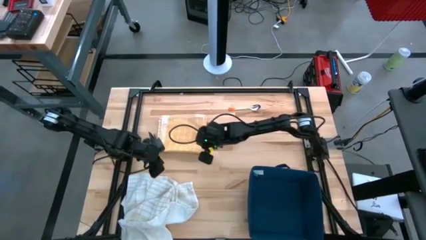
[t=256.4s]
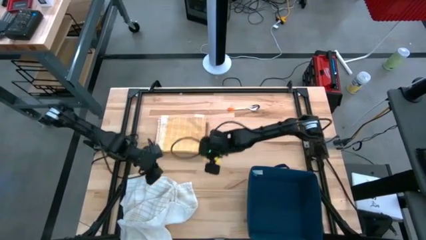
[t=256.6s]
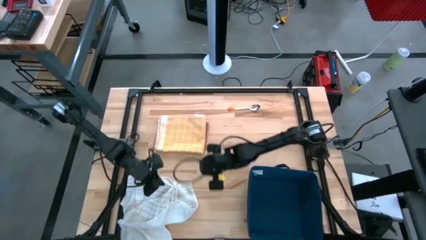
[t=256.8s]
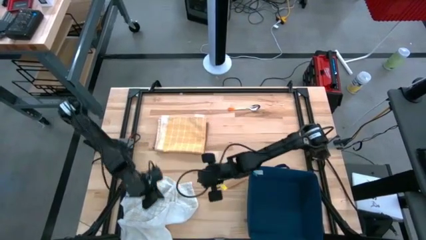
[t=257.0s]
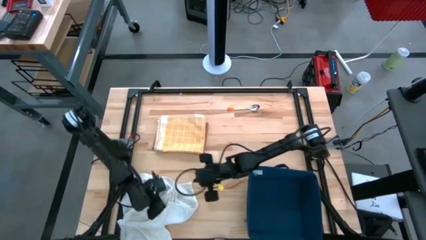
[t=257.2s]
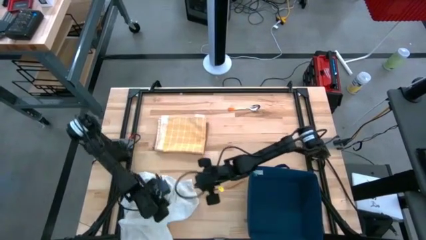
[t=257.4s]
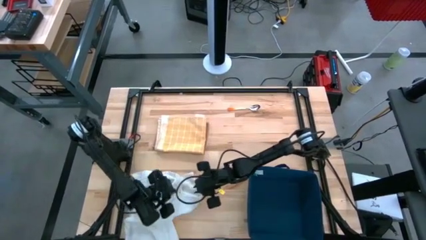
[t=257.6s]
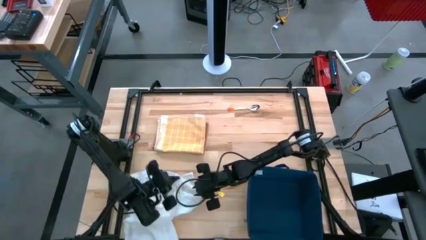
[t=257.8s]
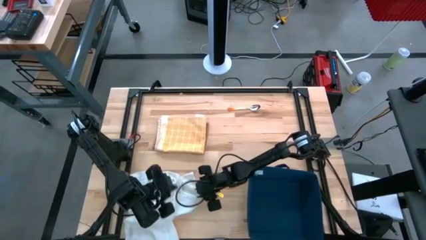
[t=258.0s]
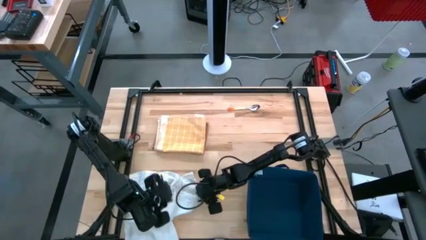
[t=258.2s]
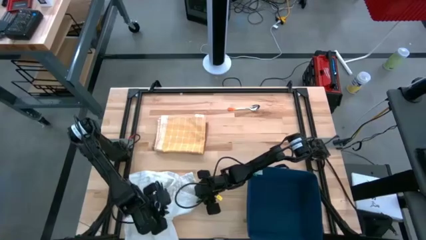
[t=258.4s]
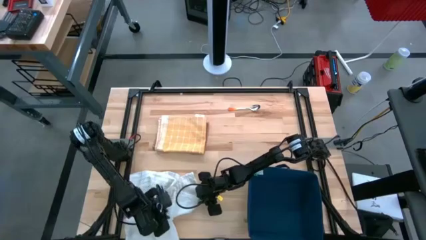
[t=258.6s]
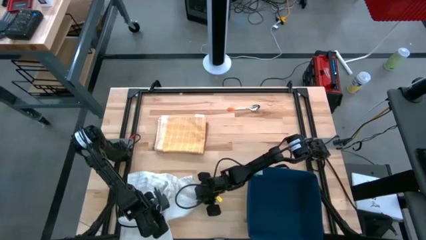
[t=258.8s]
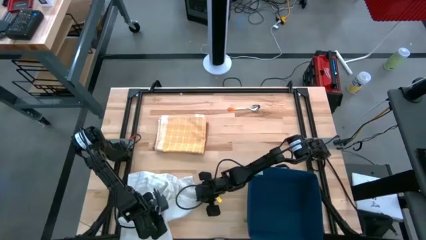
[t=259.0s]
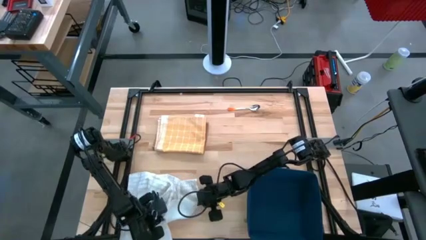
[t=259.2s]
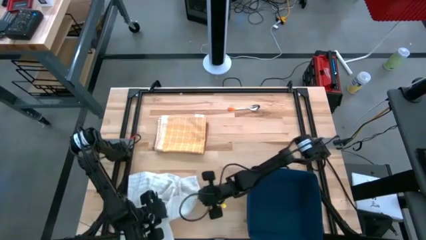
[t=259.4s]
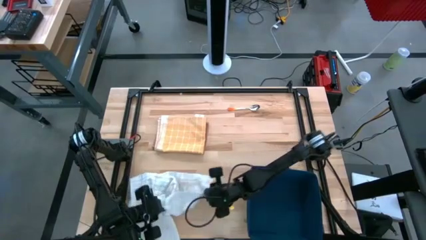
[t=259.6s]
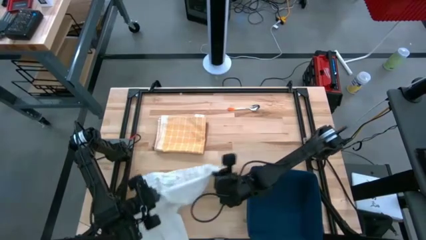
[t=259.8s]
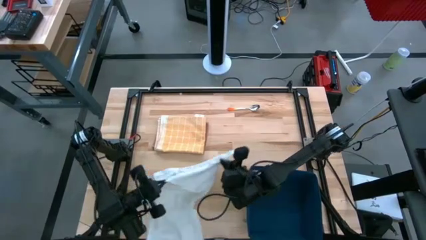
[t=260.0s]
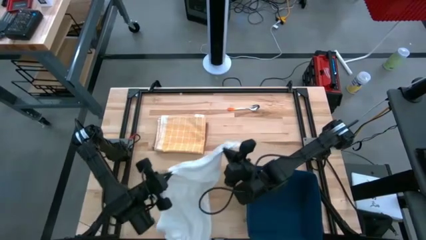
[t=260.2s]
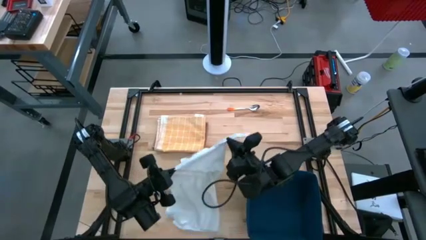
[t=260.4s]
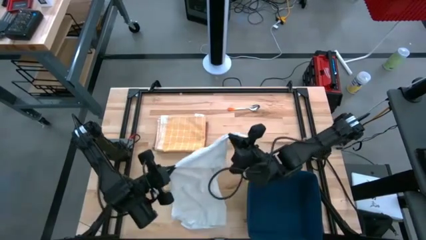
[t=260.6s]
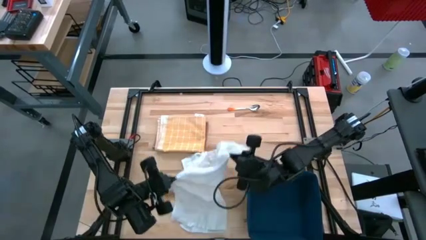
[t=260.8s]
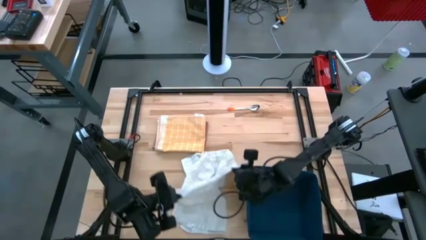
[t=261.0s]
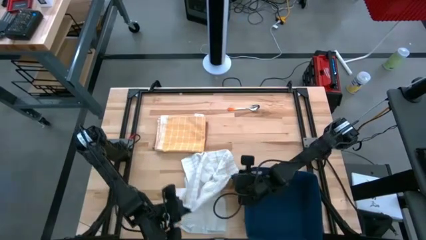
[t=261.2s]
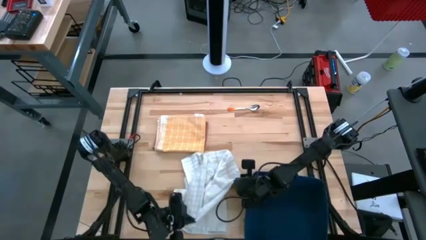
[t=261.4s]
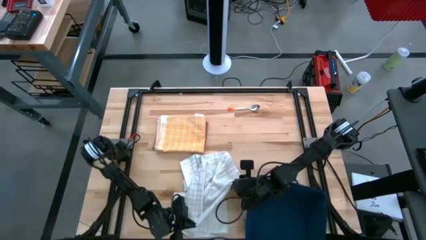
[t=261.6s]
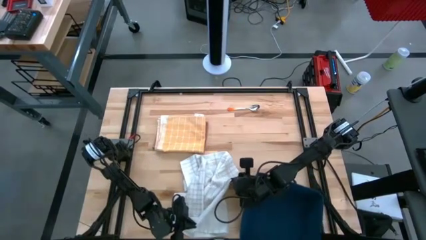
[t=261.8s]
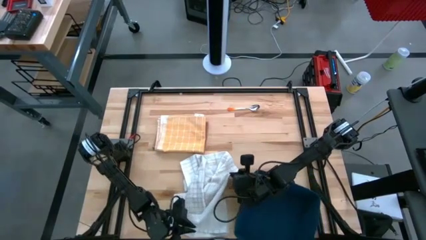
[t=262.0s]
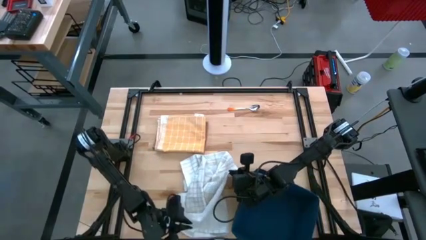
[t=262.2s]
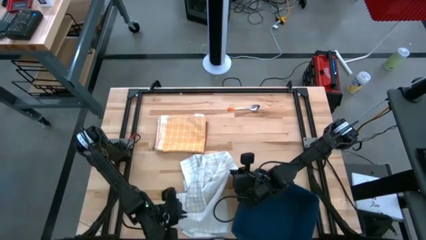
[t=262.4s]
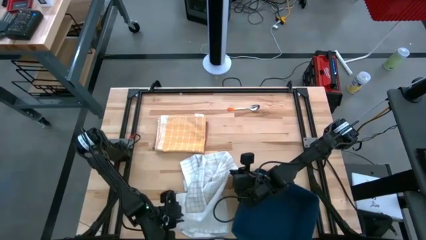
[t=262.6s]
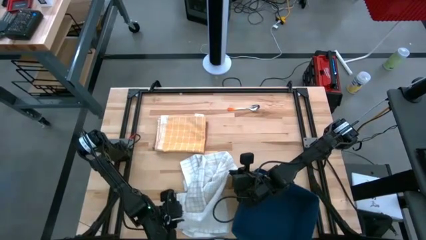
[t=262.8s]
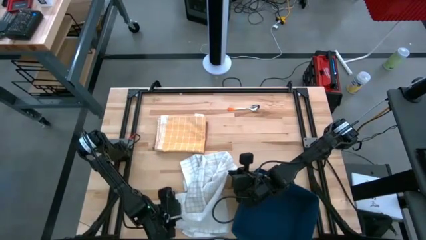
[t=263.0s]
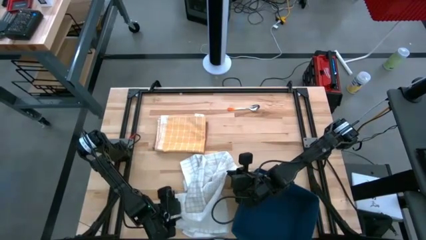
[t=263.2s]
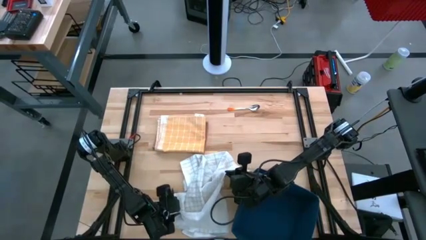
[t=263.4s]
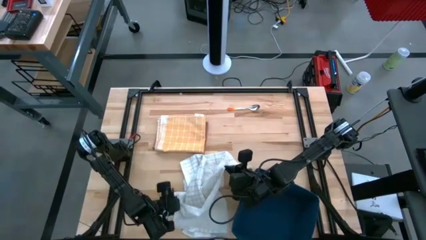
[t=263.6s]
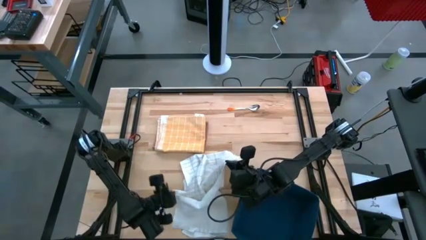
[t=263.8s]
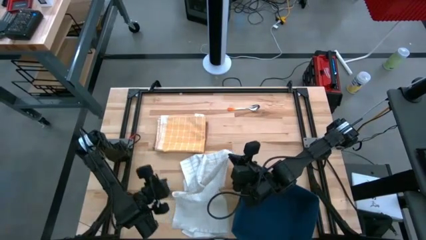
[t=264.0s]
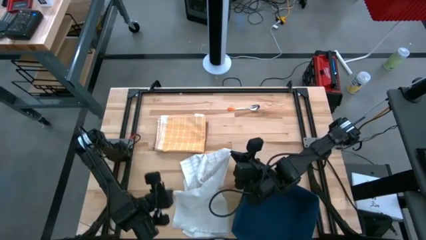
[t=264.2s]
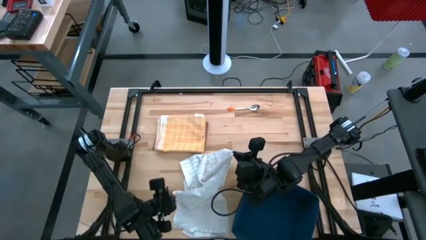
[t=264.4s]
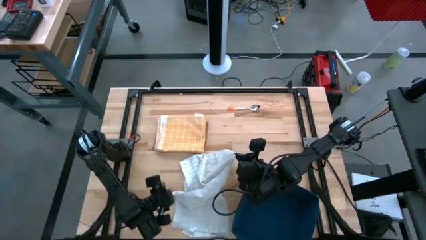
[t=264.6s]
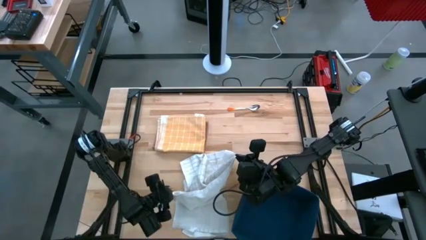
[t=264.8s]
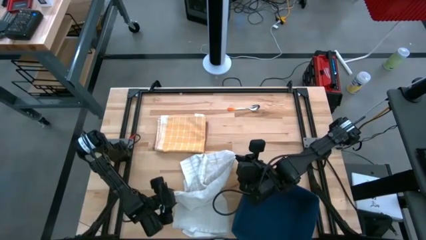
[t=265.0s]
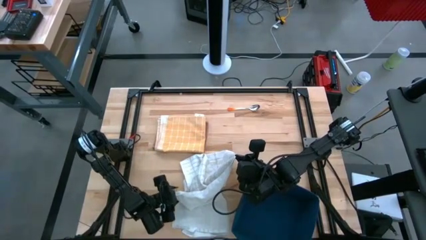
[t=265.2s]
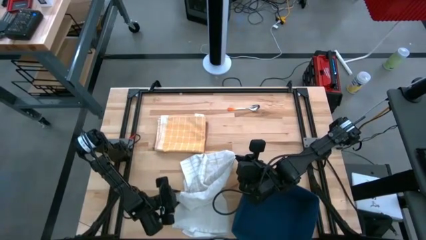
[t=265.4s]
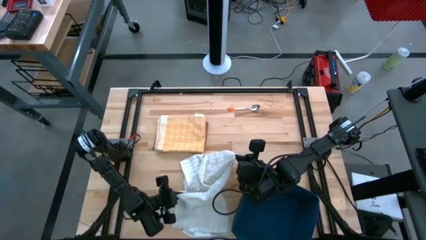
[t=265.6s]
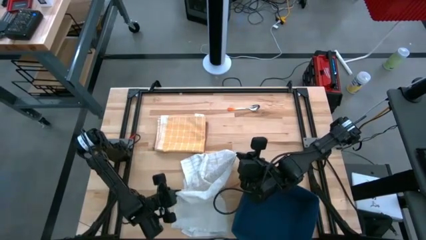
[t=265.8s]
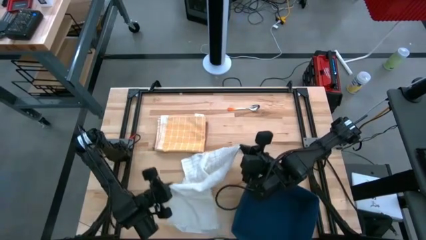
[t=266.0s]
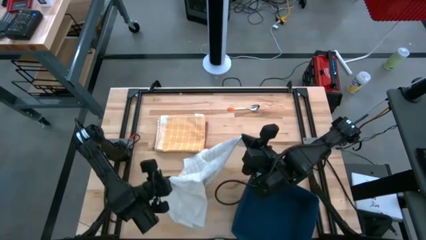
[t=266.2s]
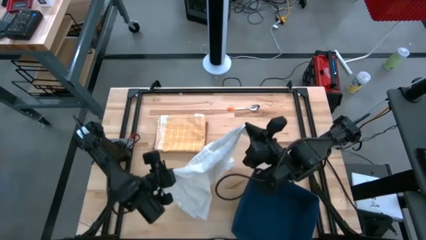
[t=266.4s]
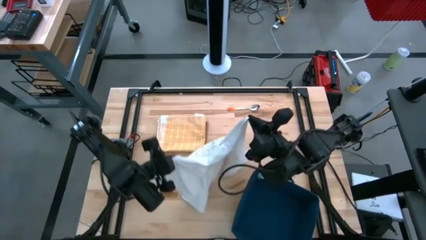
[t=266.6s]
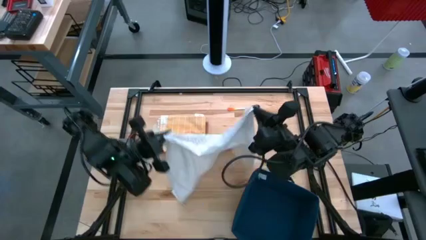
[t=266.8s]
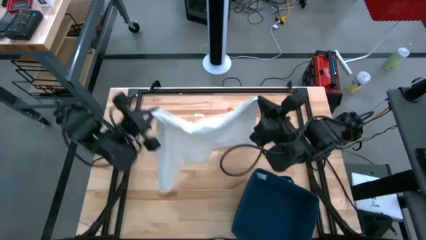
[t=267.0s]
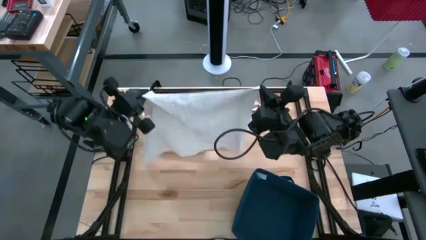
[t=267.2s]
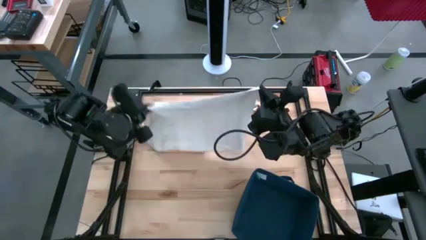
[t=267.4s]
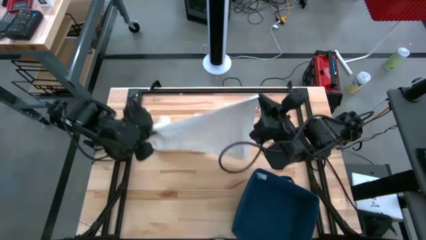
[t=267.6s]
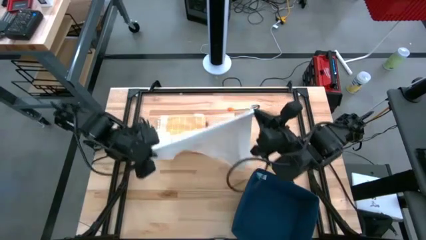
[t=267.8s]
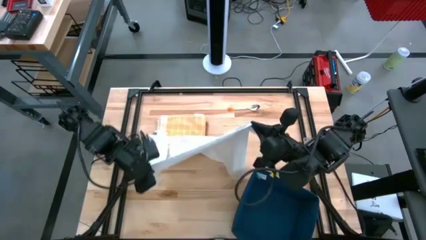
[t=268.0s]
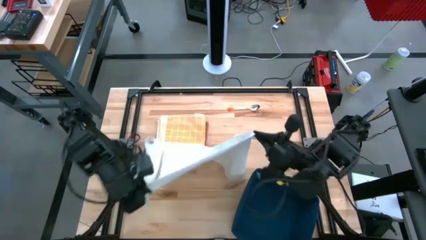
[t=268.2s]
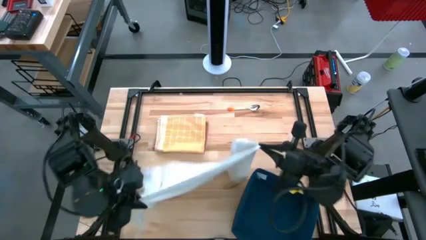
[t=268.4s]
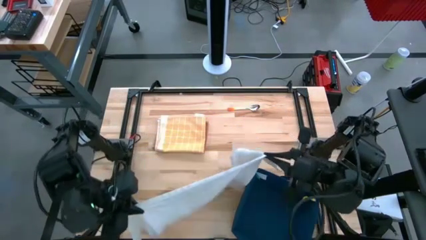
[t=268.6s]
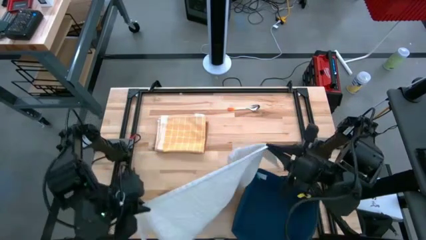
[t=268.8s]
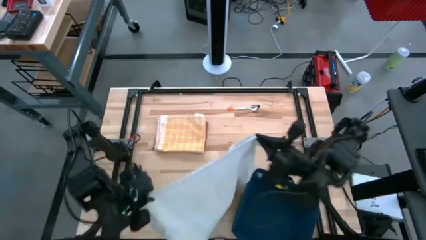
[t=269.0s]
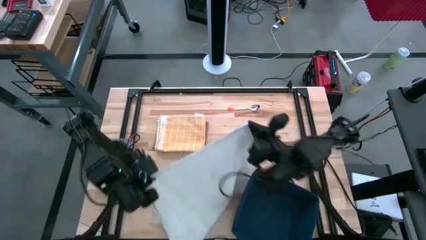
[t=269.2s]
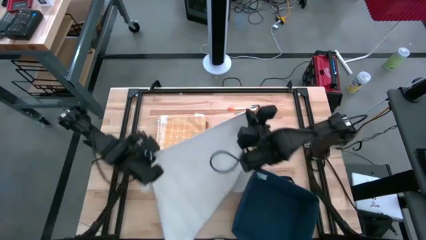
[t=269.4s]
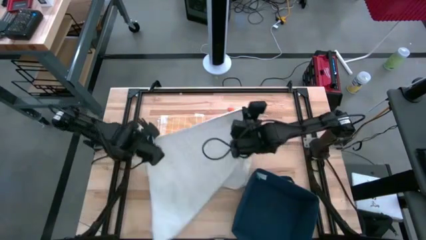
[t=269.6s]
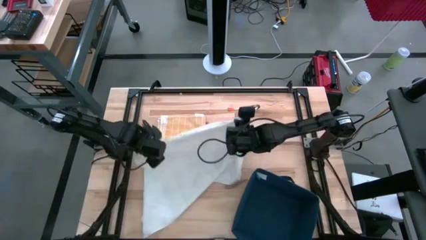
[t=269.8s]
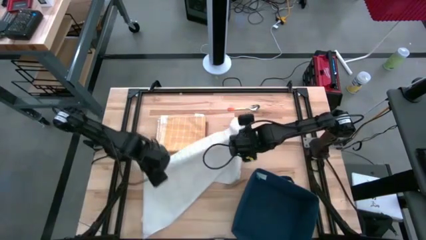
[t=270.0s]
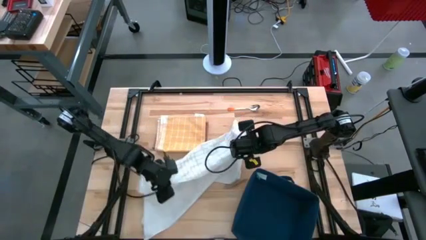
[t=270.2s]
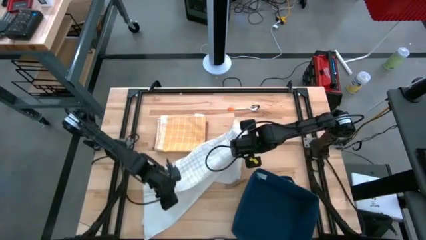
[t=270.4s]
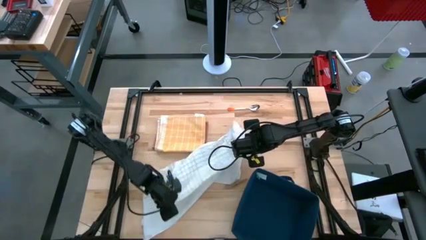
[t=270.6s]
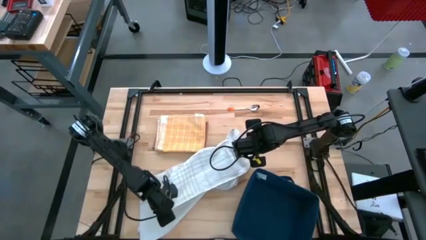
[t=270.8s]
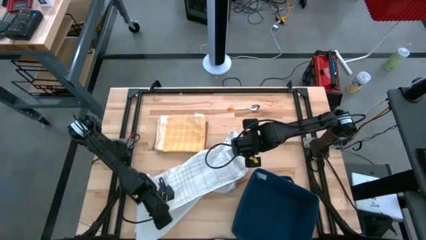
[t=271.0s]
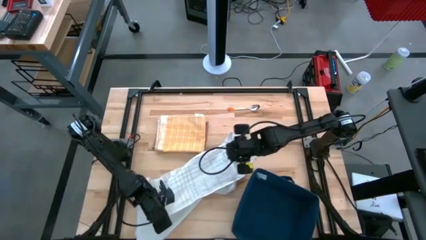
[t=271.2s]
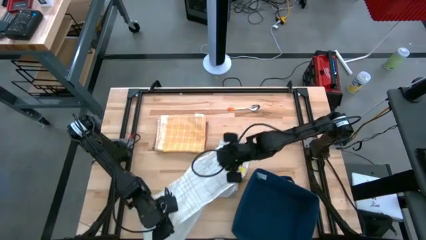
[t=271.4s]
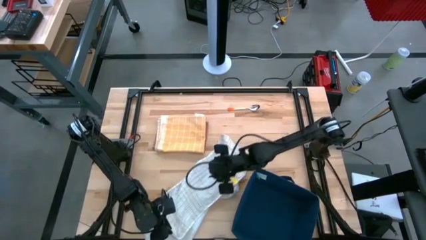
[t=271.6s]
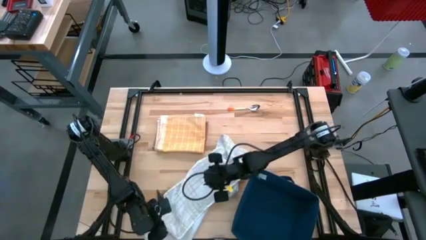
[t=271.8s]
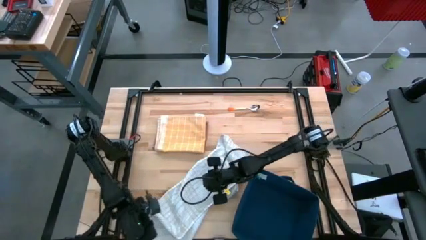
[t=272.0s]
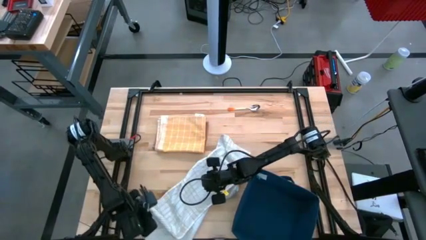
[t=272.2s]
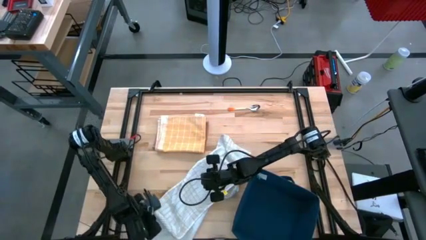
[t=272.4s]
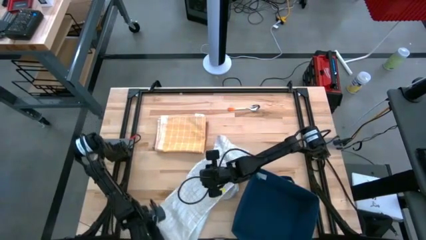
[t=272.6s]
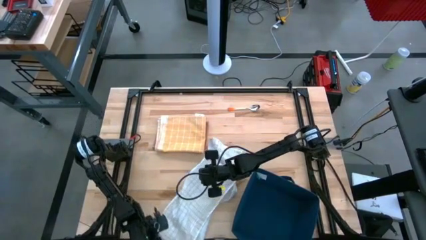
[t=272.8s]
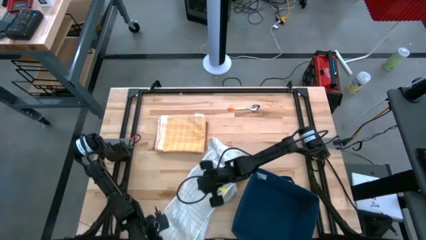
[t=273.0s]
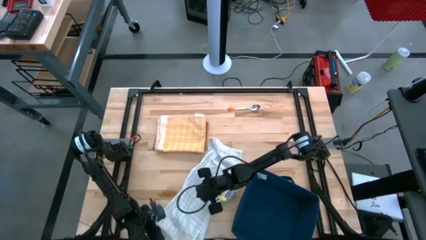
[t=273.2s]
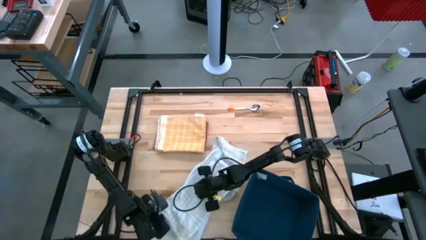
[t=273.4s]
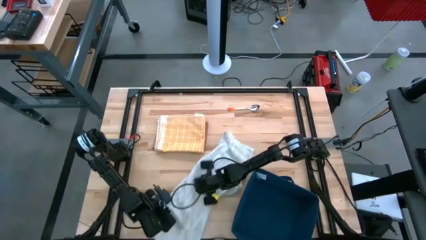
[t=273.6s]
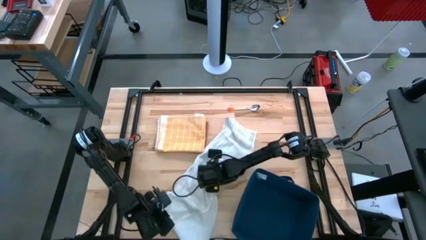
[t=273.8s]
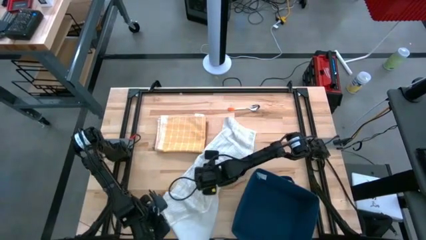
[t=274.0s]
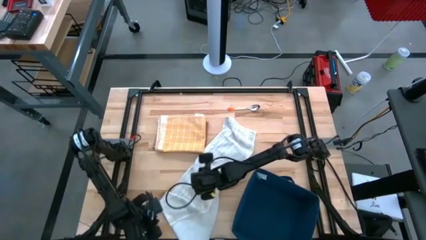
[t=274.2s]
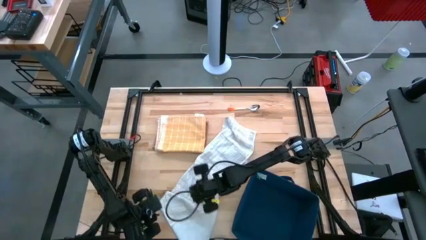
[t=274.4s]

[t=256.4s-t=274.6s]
Task: Fold towel
Fold the white towel
